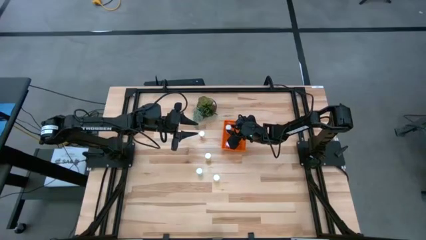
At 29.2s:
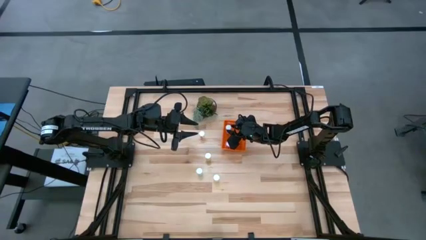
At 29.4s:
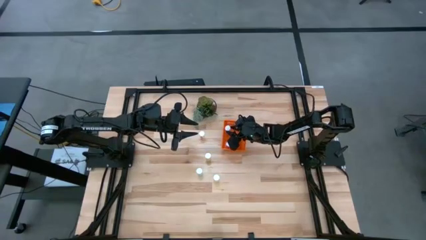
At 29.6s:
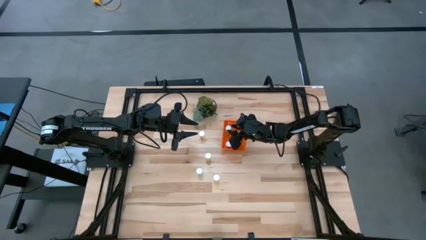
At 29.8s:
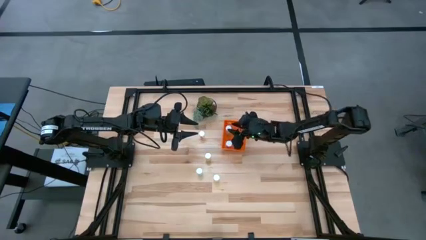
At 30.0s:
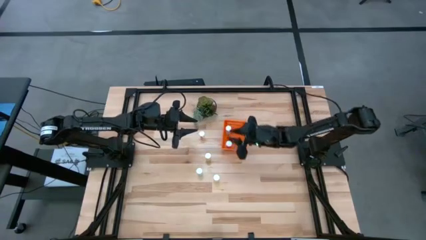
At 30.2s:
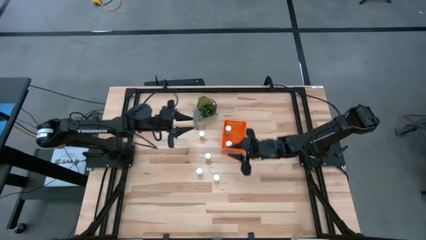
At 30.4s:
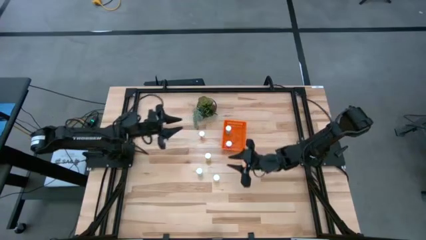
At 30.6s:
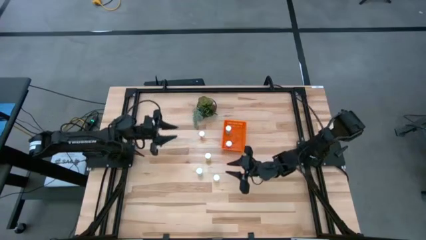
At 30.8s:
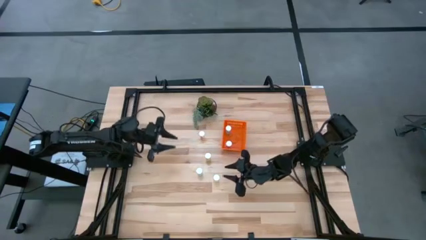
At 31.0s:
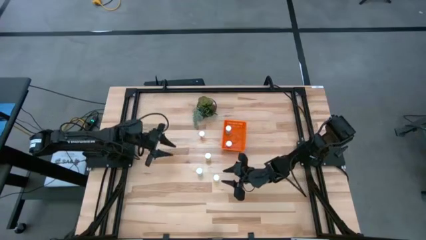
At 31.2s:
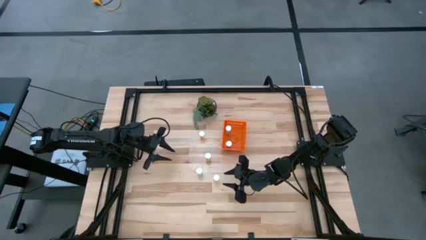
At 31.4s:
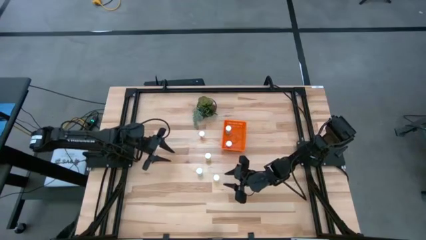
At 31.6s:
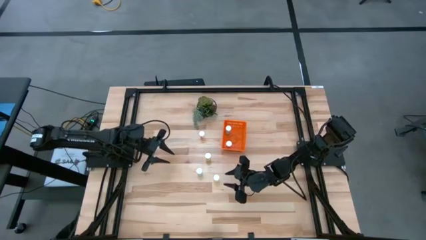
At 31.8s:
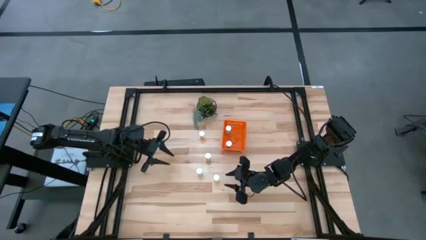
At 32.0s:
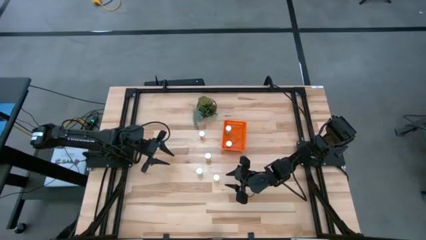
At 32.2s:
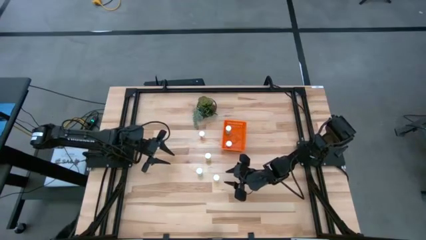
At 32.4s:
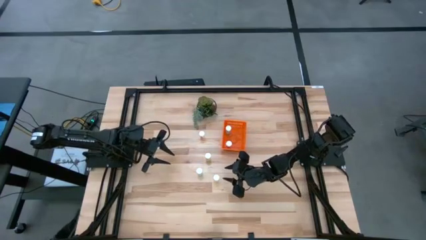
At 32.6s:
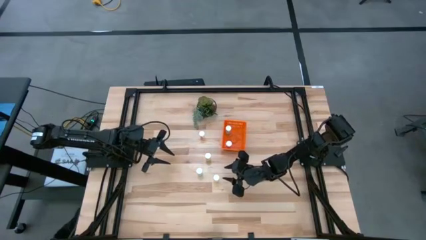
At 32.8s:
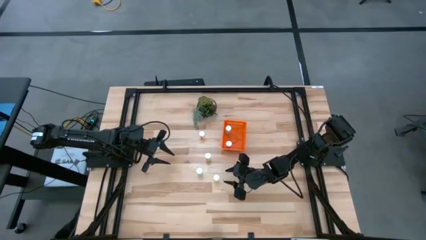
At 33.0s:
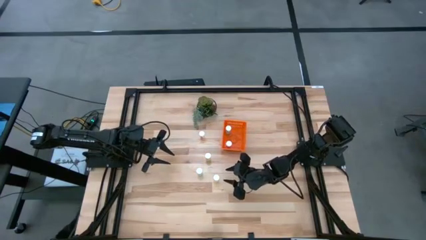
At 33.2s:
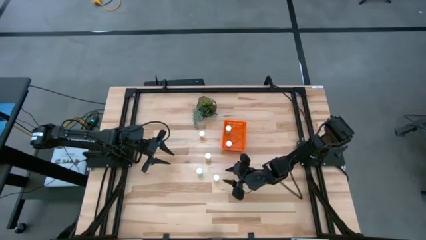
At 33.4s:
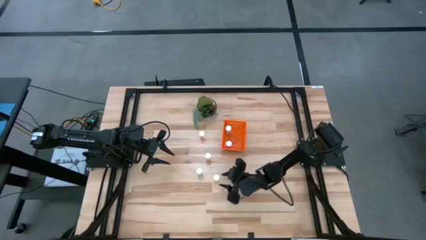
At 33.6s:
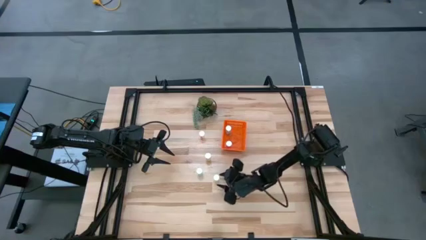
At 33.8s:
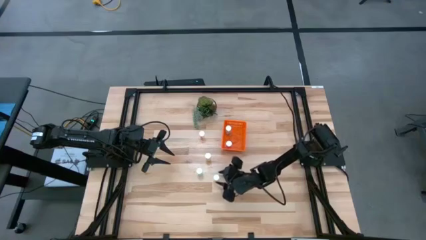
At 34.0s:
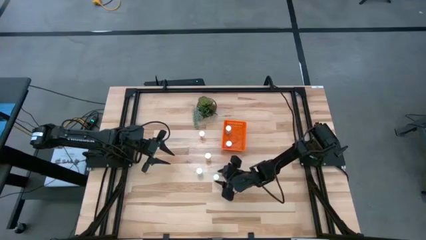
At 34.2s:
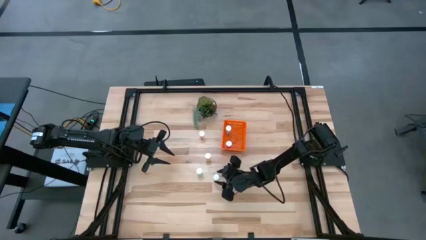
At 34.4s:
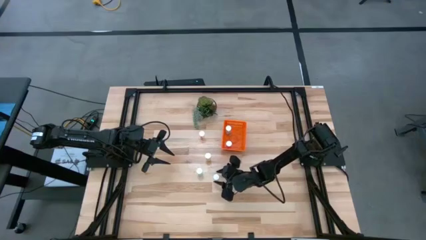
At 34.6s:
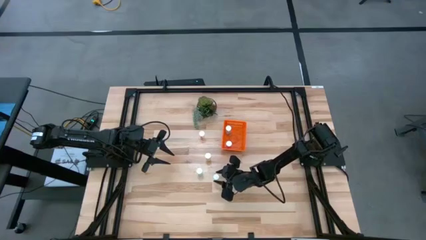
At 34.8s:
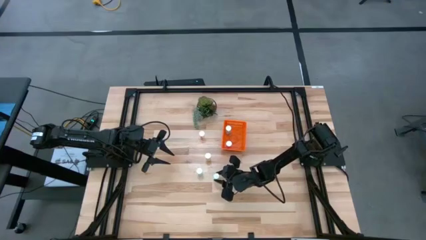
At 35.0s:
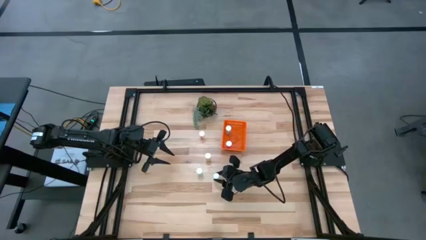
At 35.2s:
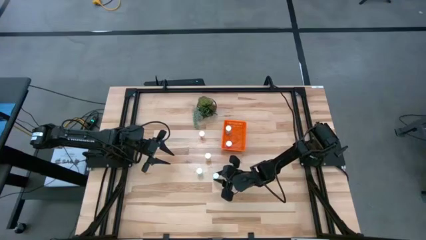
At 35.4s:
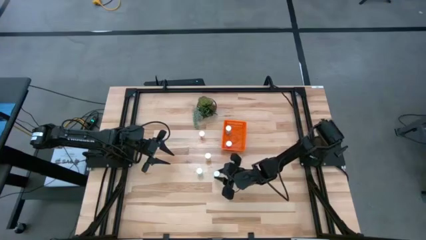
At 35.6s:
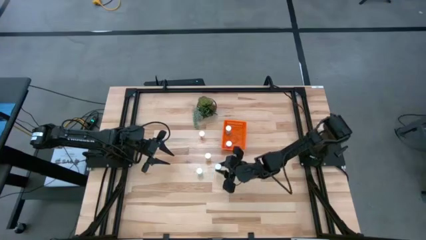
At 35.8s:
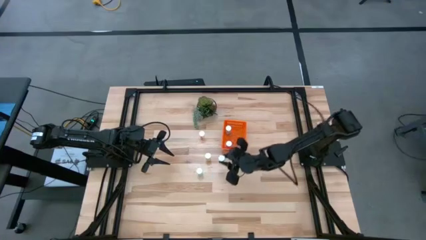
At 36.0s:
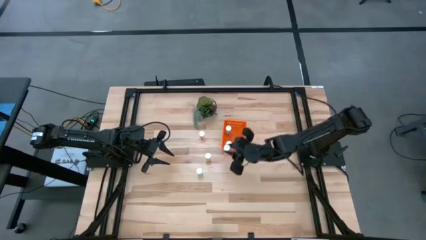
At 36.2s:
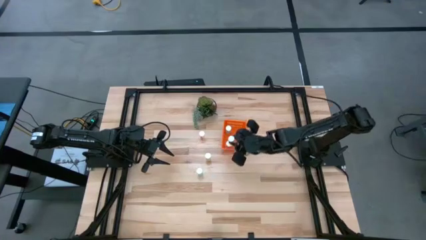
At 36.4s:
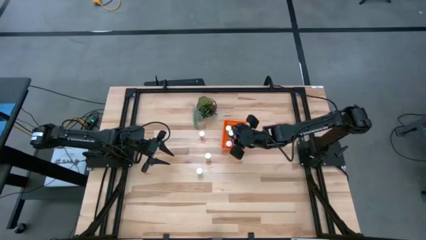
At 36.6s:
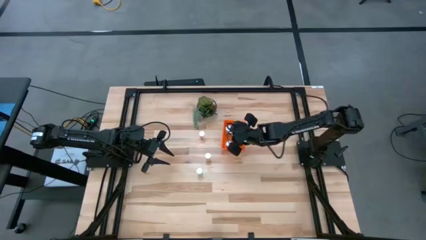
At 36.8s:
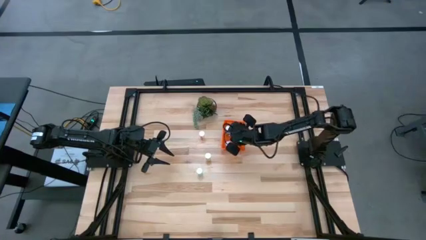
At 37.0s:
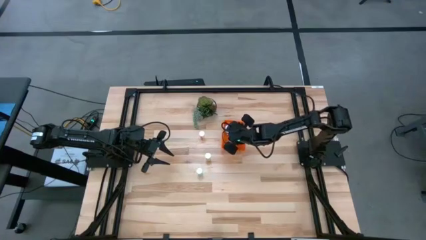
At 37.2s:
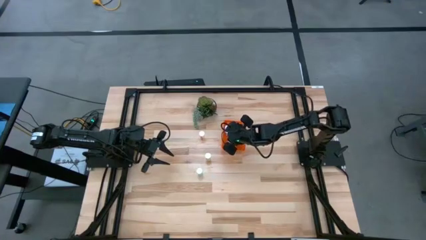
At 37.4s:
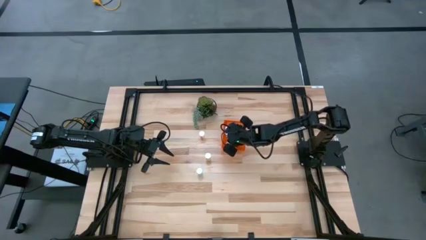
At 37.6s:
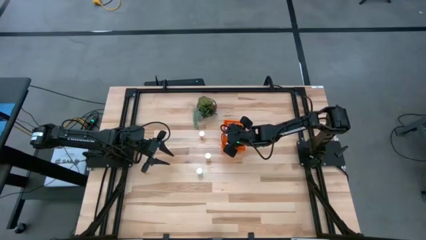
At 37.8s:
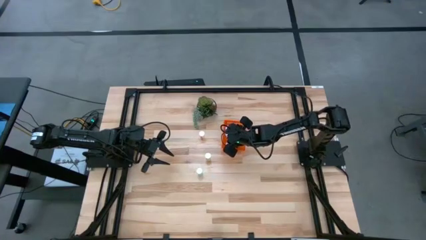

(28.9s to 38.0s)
Task: Pick and place pill bottles into a basket
Put the bottom yellow pill bottle into the basket

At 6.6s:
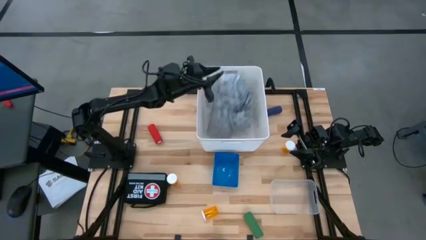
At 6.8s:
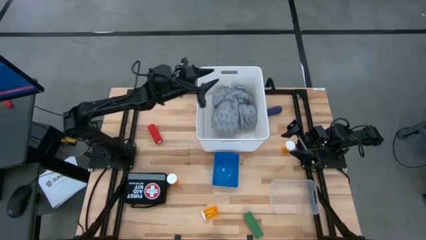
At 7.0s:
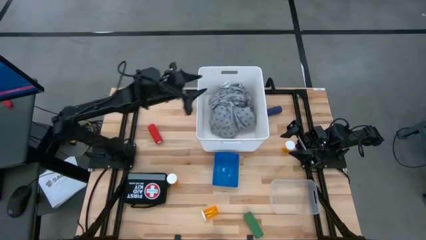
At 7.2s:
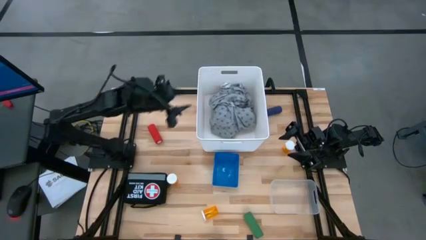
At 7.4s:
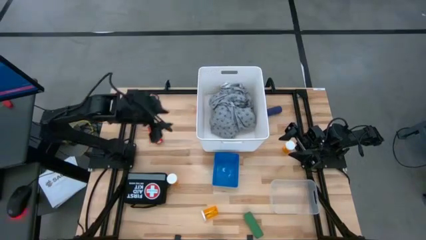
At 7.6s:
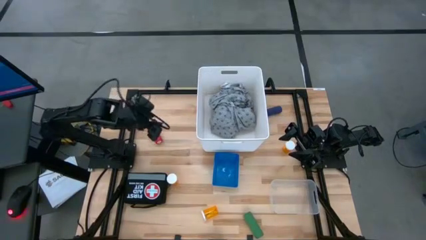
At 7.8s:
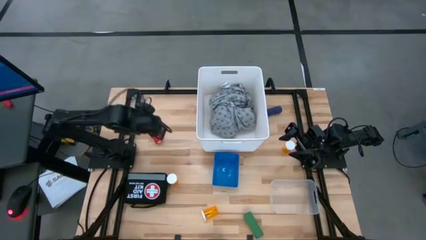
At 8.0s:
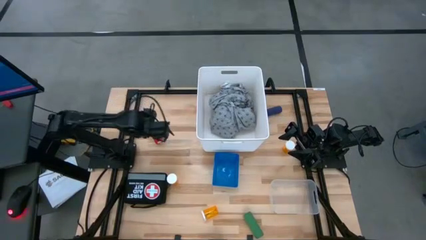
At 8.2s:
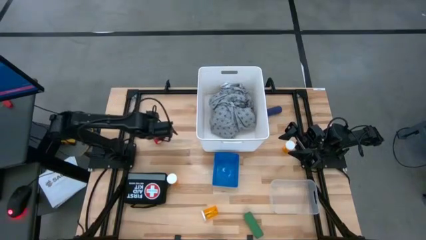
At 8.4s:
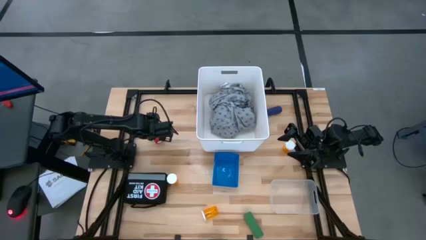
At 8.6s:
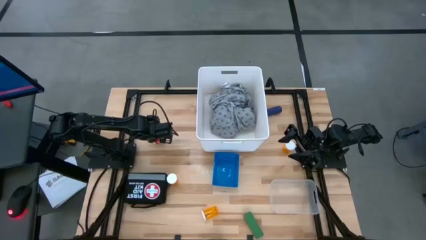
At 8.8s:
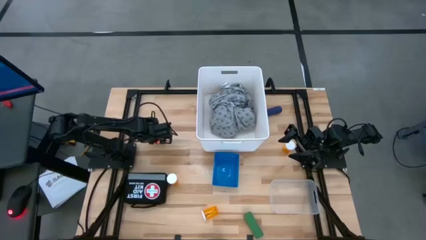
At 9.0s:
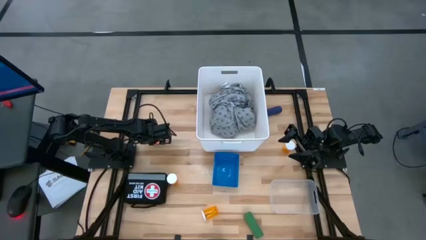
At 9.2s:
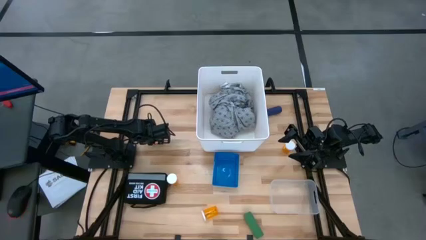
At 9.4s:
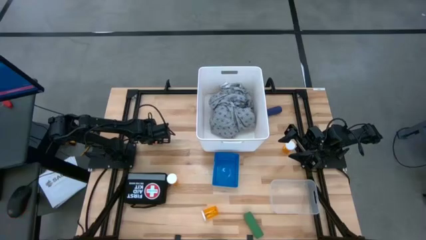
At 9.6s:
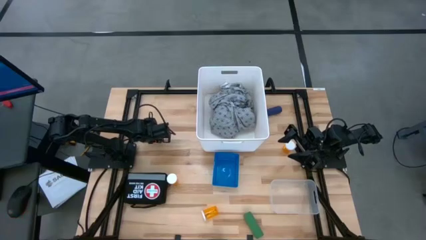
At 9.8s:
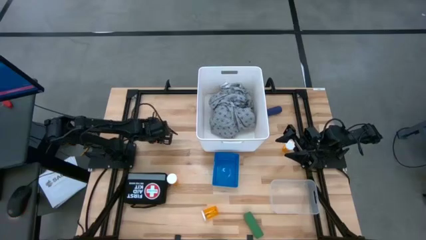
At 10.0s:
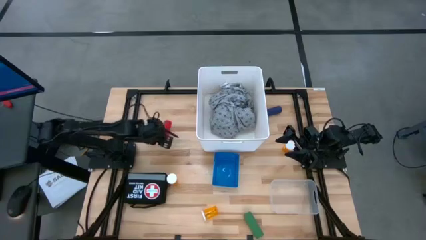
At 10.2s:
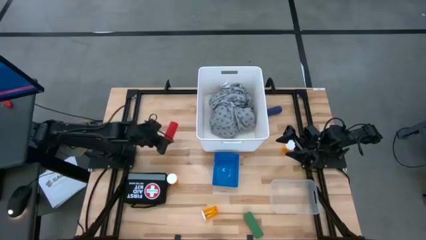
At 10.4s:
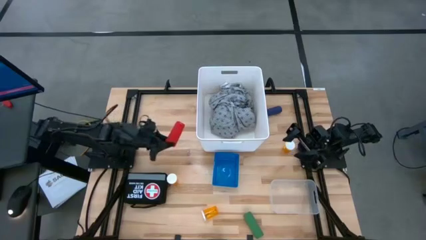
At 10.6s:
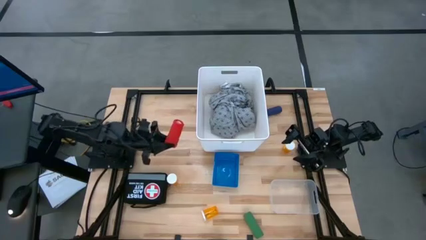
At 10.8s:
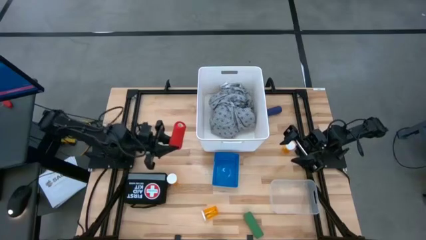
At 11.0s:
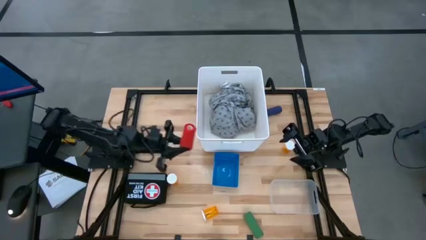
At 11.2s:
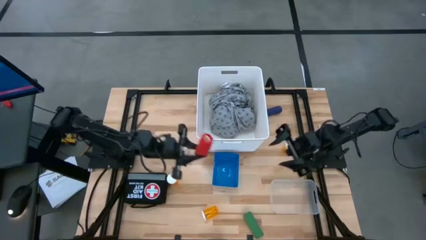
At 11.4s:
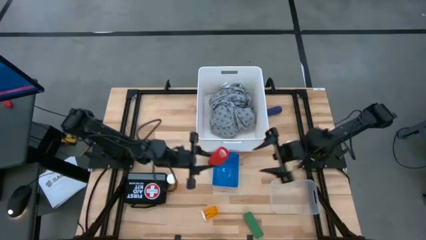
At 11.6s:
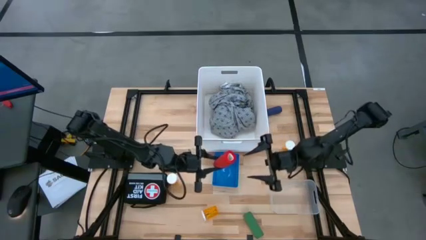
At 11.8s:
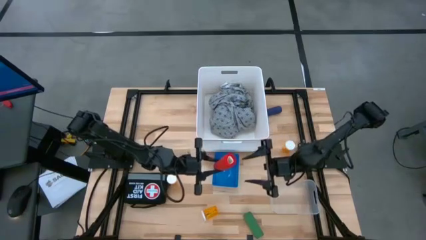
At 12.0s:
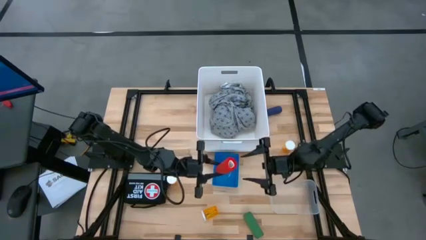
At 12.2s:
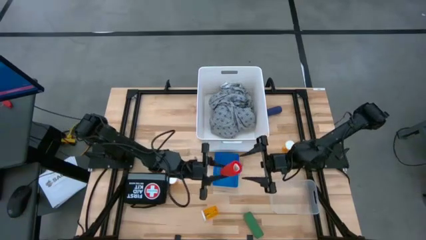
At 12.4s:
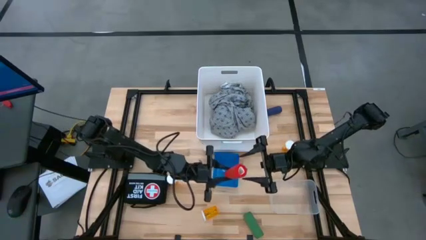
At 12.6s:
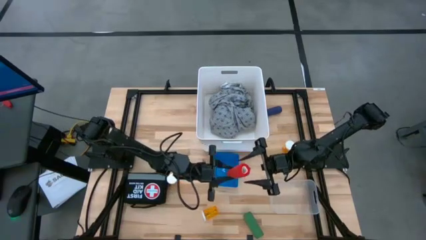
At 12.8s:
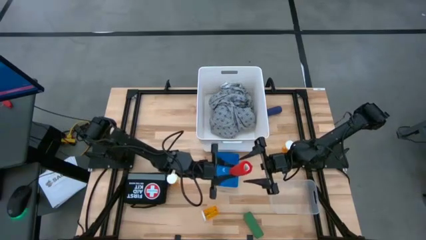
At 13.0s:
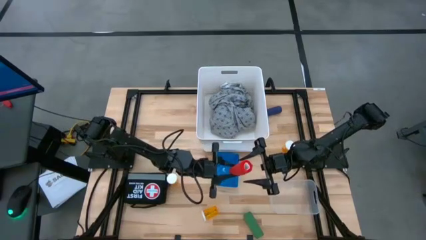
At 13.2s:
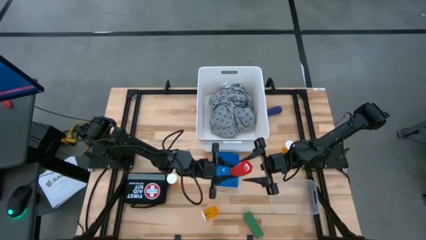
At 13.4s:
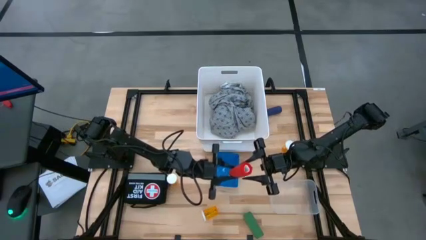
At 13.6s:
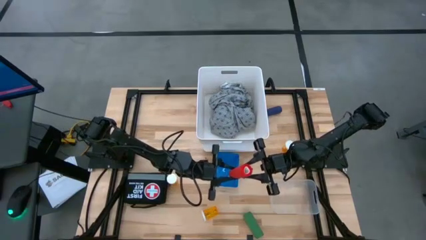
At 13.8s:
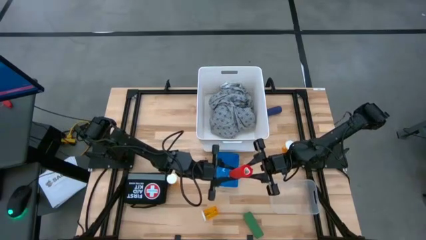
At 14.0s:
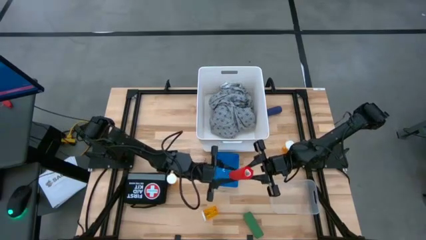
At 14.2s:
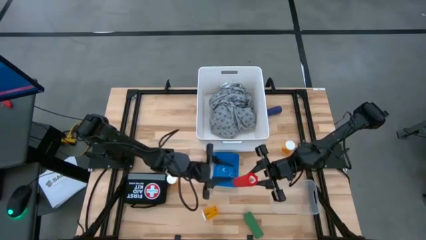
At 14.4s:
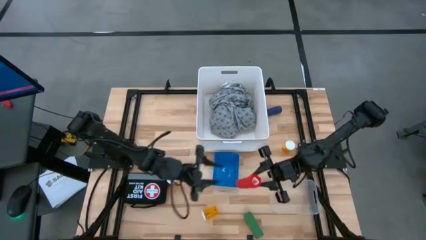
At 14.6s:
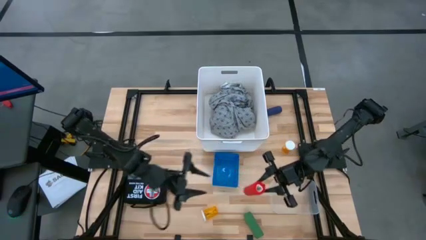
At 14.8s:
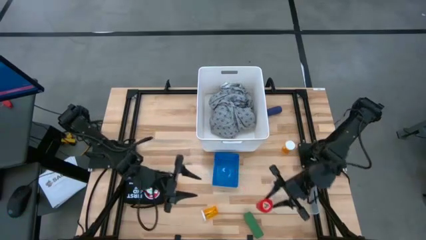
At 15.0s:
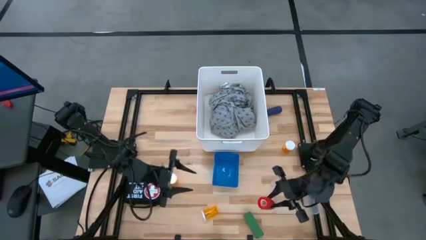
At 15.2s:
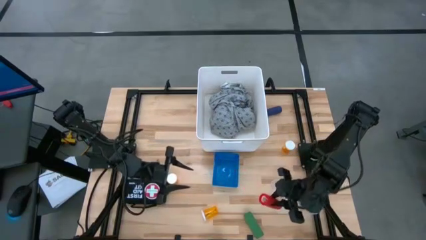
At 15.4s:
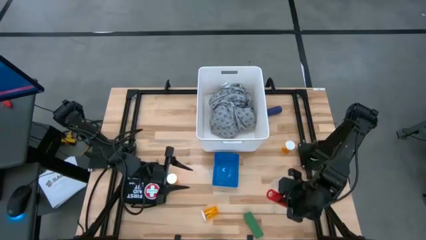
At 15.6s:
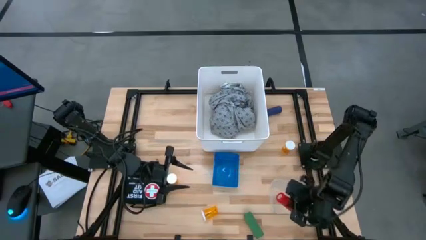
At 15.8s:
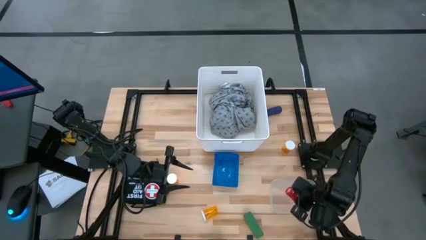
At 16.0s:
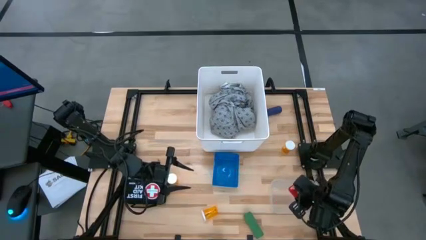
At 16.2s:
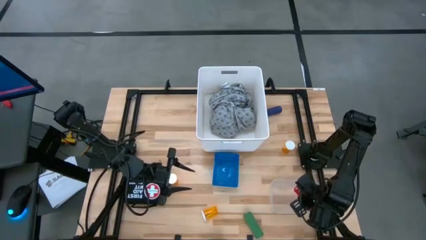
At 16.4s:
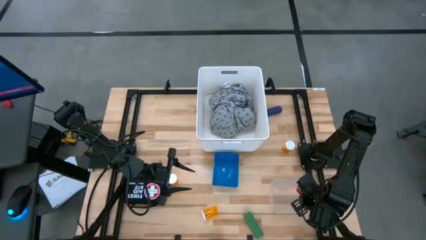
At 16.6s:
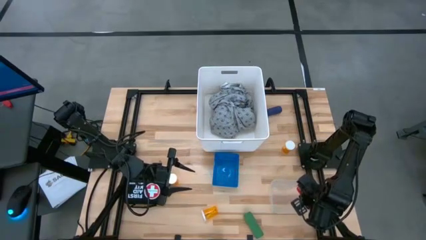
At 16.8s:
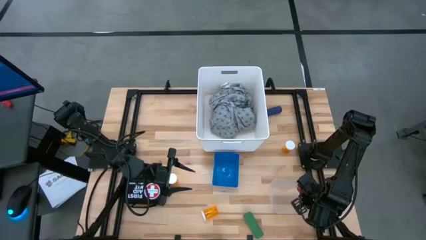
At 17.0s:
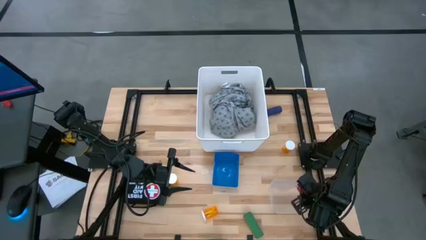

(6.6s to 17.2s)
Task: Pick & place medical supplies in basket/bin
Put the red bandage into the transparent bin
